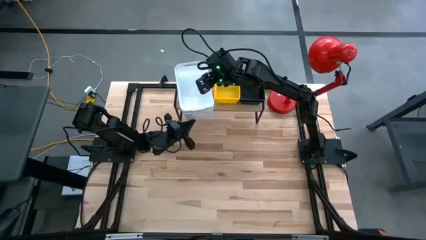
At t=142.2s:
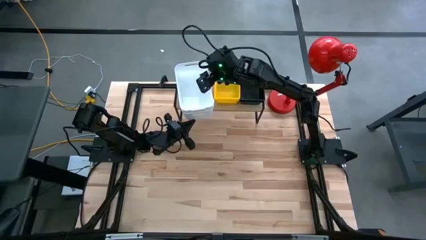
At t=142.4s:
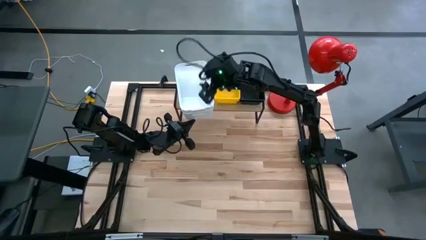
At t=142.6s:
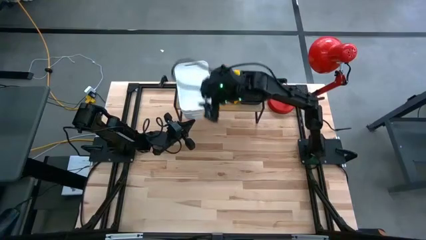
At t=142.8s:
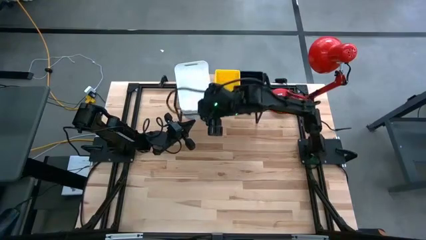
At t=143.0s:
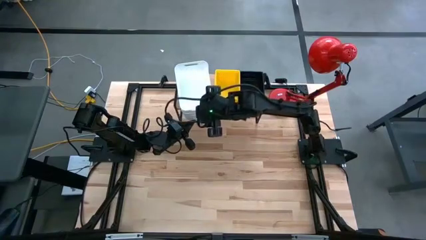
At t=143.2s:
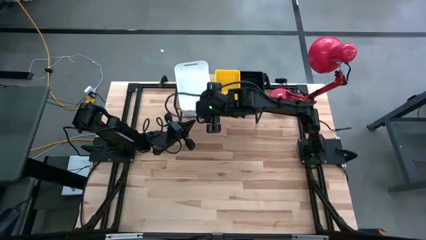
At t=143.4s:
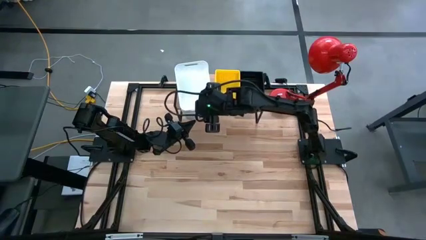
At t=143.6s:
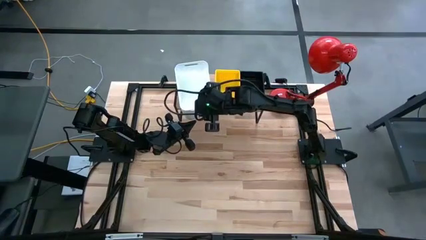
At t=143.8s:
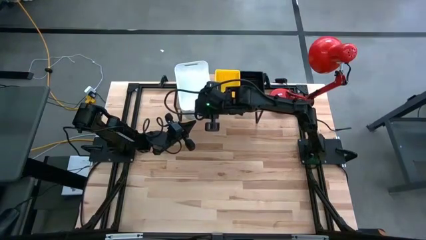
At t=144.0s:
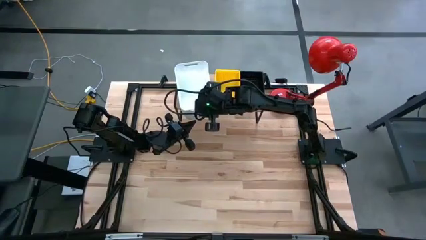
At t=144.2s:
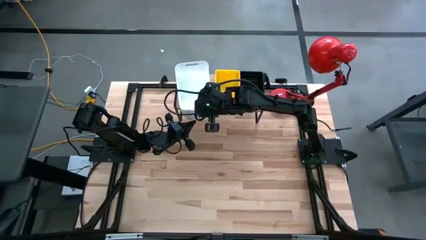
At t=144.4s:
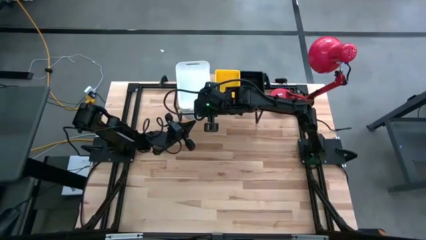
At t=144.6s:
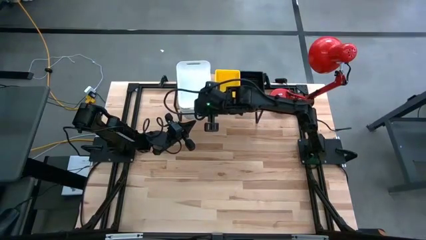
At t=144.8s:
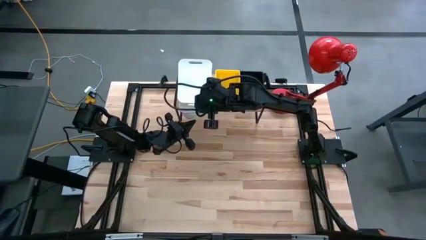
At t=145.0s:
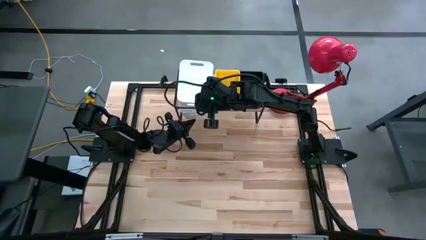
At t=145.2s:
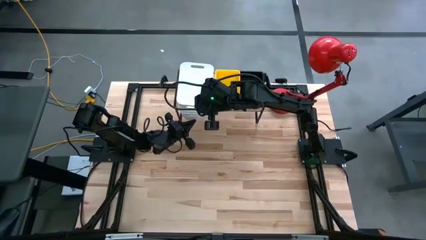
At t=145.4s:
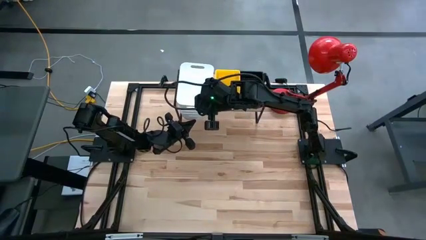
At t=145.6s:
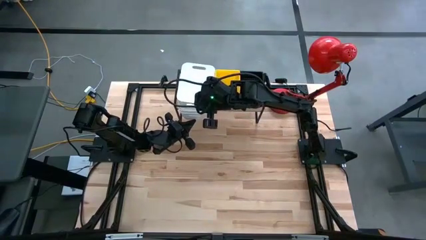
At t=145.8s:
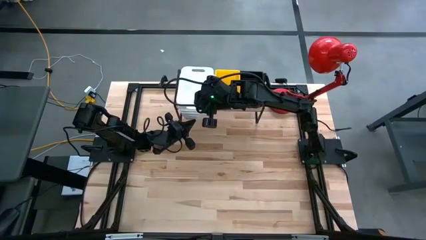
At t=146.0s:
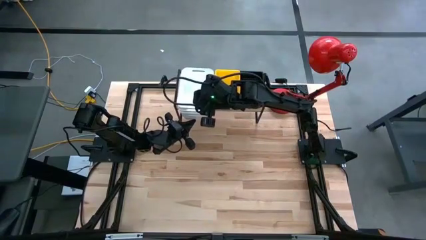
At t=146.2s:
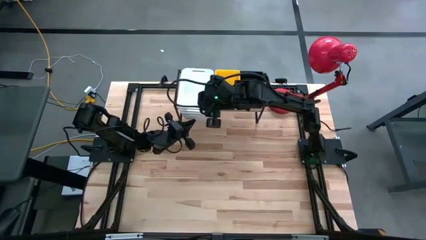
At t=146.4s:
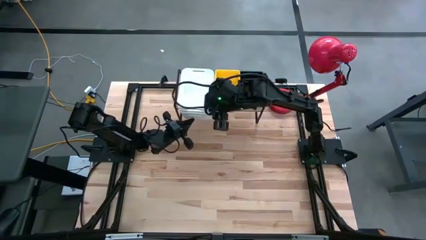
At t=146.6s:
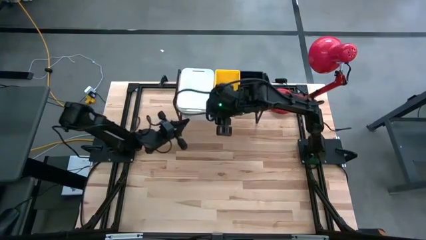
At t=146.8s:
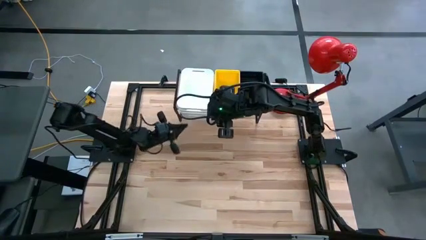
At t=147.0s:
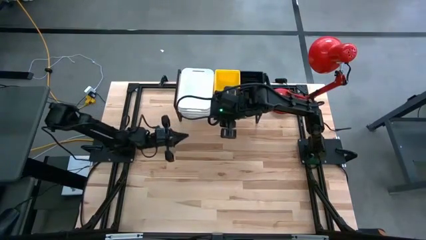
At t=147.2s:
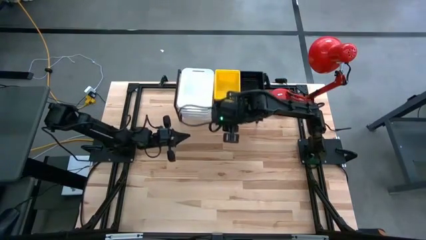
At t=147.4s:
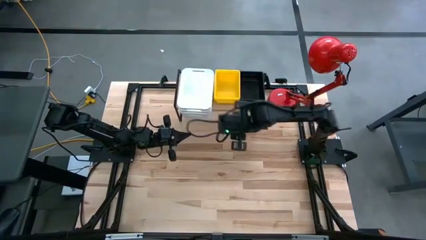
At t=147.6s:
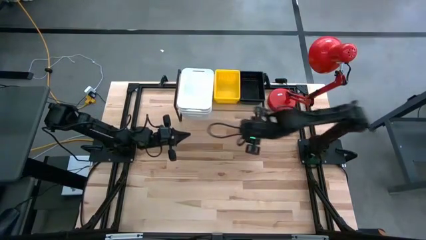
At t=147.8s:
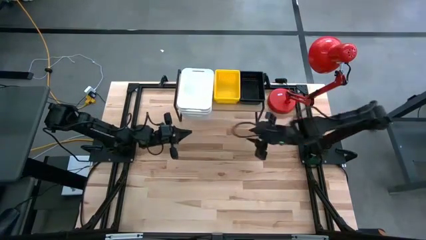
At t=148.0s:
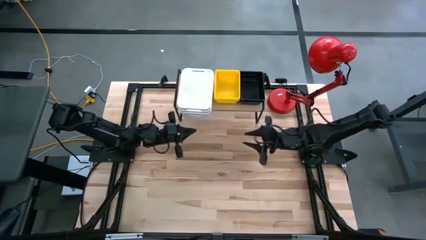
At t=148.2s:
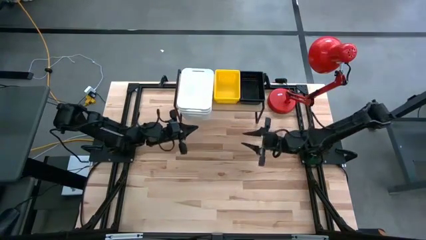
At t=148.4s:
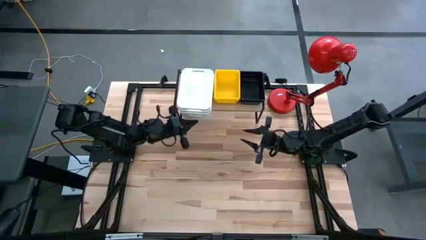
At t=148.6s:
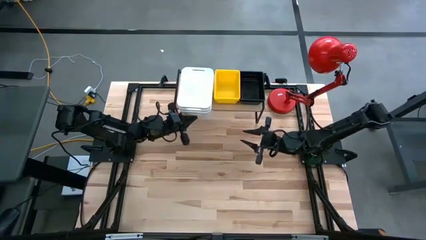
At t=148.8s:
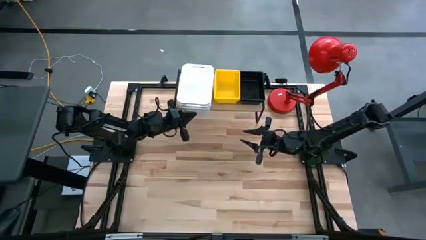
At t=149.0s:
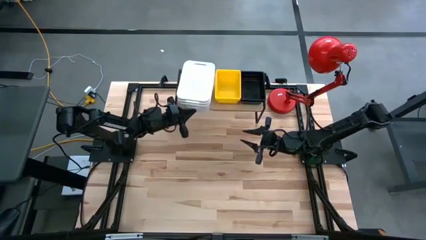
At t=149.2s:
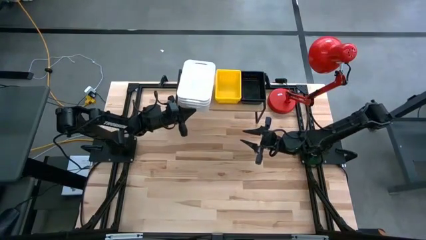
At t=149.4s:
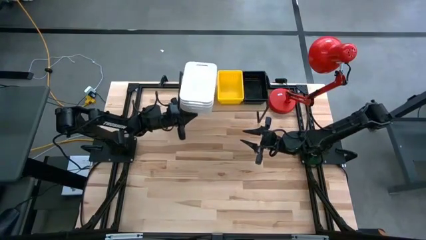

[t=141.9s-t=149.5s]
Task: Stack baskets on shelf by color
Stack the white bin into the other white bin on the shelf

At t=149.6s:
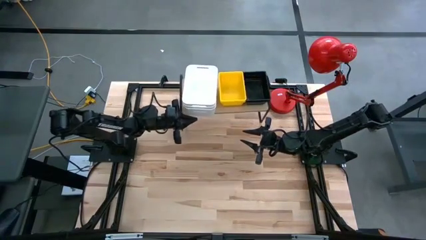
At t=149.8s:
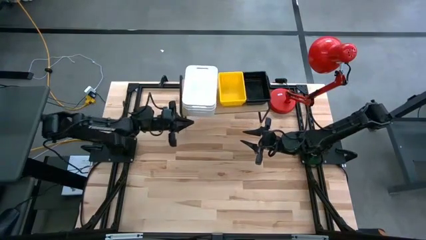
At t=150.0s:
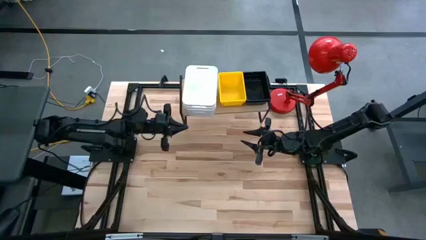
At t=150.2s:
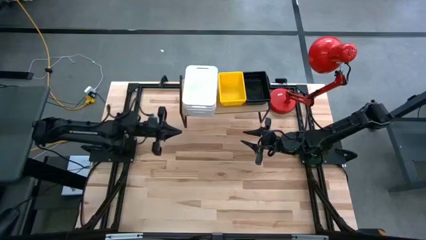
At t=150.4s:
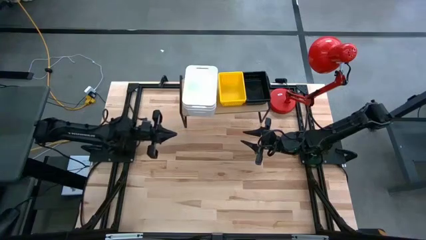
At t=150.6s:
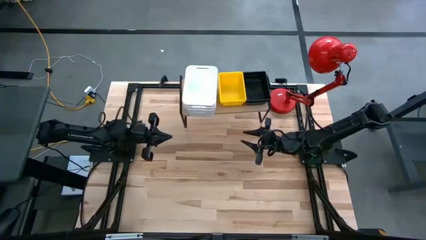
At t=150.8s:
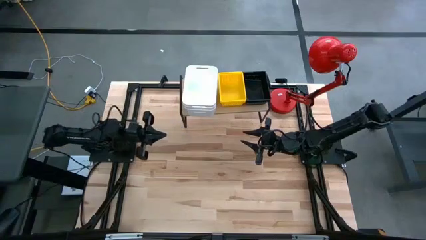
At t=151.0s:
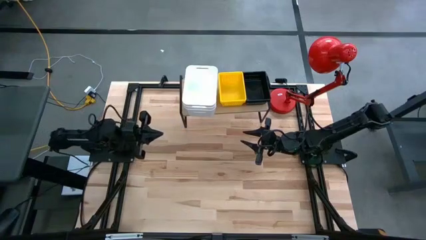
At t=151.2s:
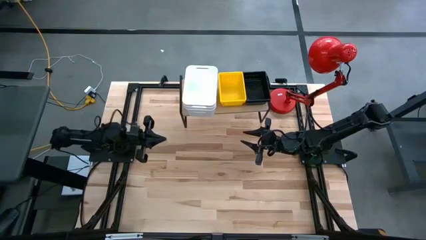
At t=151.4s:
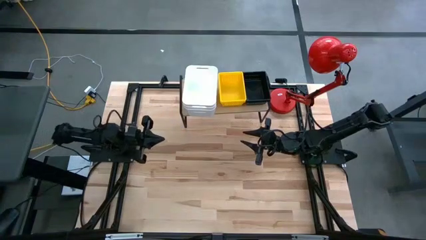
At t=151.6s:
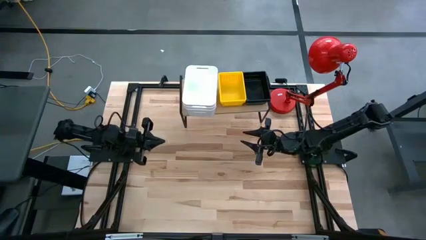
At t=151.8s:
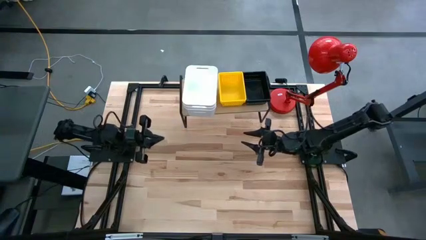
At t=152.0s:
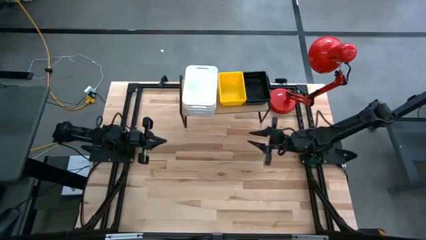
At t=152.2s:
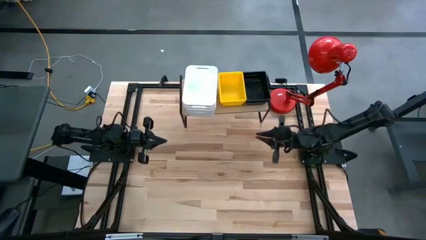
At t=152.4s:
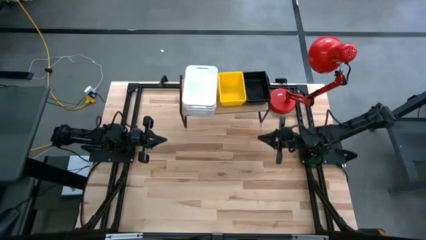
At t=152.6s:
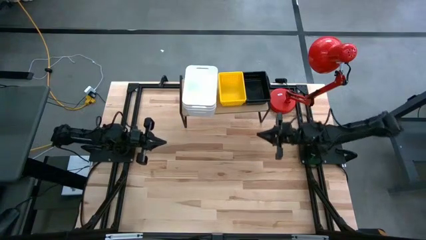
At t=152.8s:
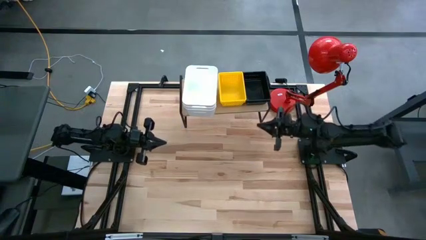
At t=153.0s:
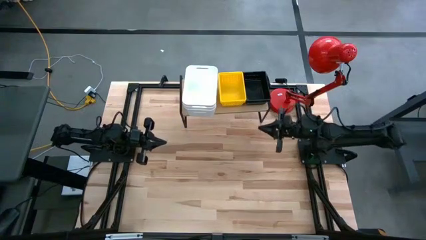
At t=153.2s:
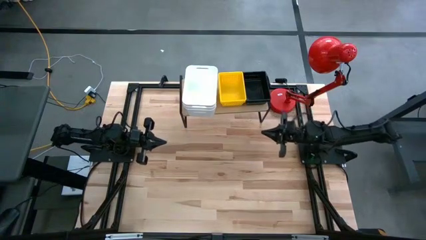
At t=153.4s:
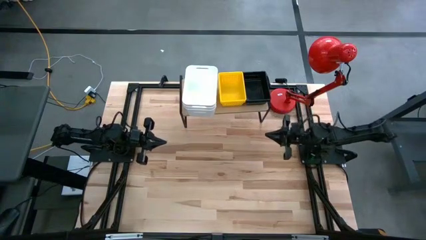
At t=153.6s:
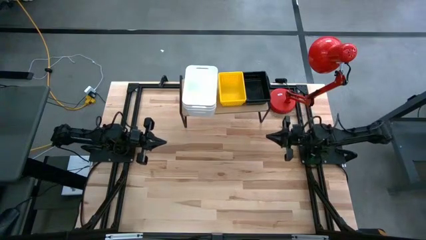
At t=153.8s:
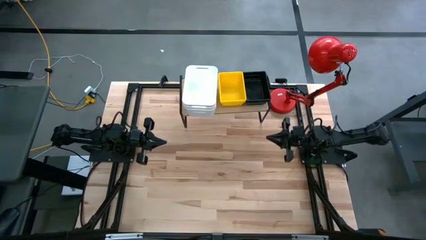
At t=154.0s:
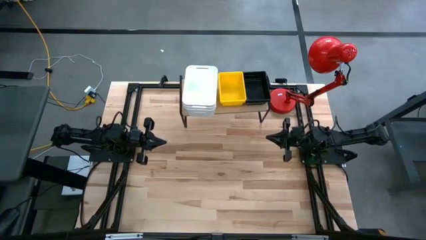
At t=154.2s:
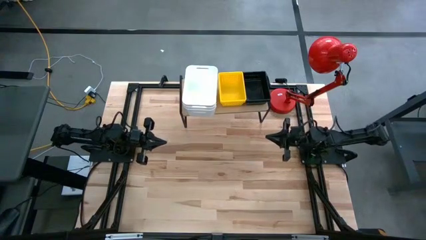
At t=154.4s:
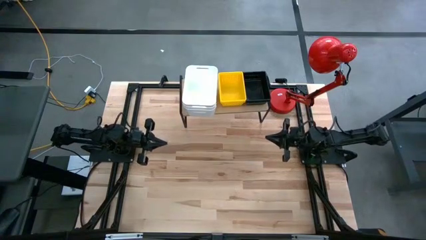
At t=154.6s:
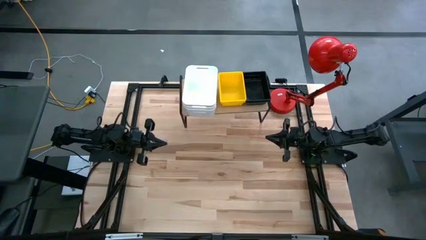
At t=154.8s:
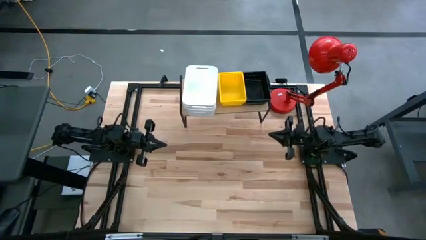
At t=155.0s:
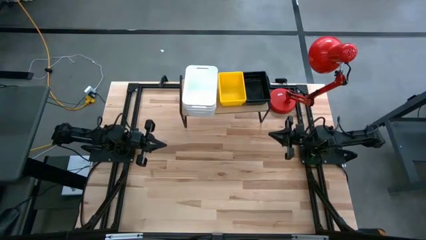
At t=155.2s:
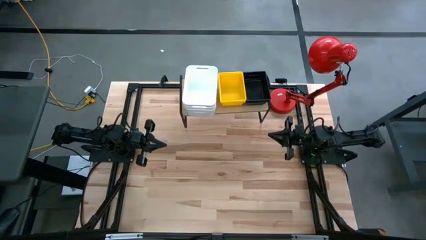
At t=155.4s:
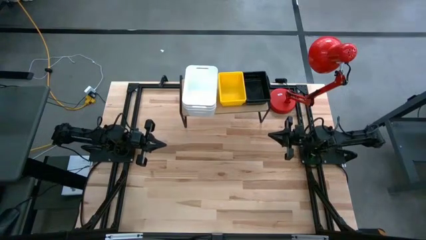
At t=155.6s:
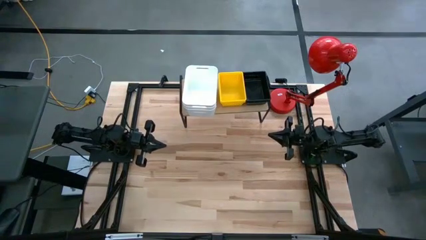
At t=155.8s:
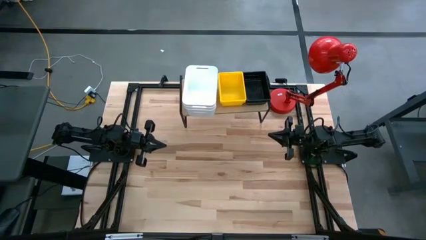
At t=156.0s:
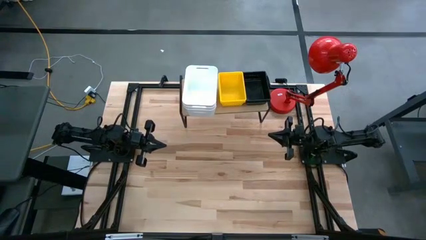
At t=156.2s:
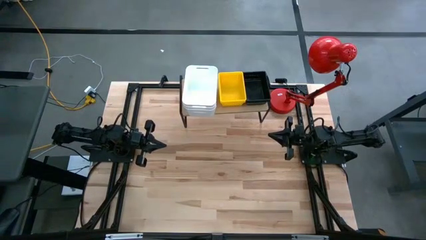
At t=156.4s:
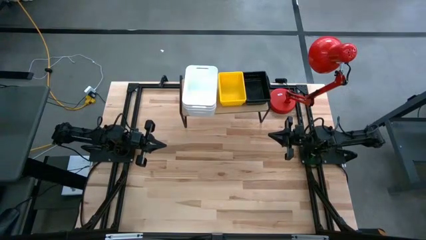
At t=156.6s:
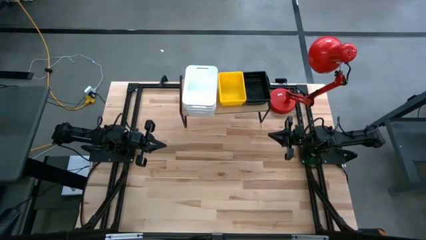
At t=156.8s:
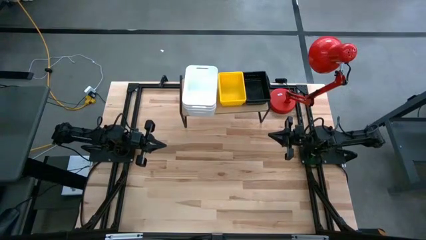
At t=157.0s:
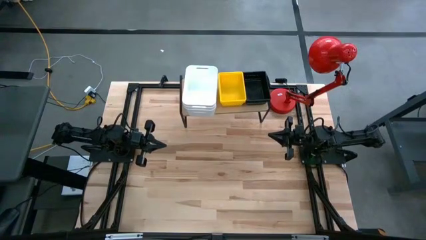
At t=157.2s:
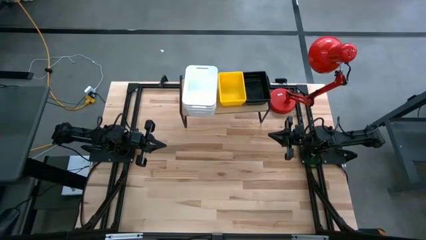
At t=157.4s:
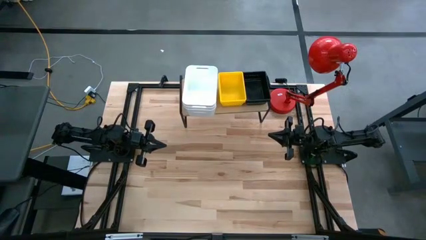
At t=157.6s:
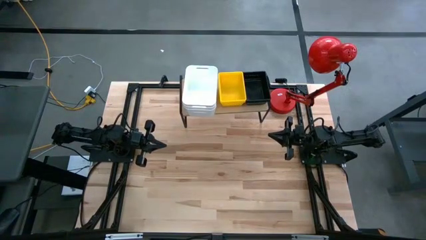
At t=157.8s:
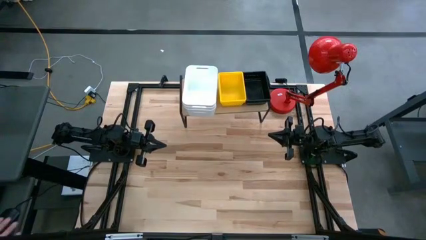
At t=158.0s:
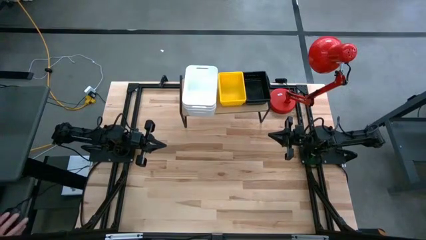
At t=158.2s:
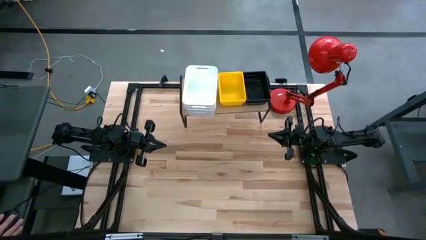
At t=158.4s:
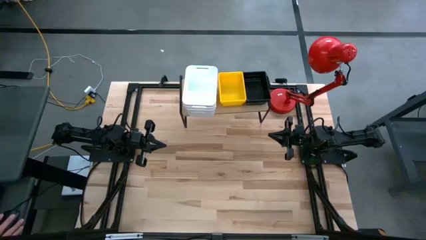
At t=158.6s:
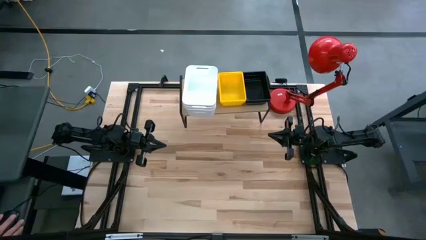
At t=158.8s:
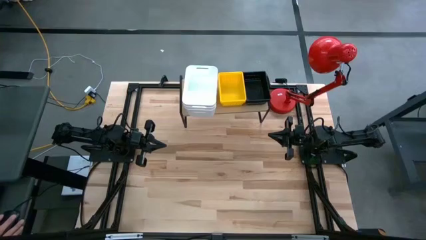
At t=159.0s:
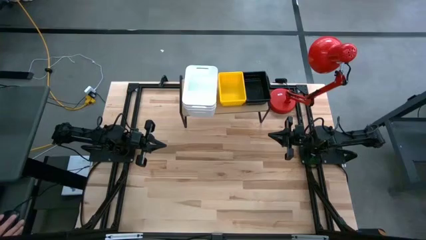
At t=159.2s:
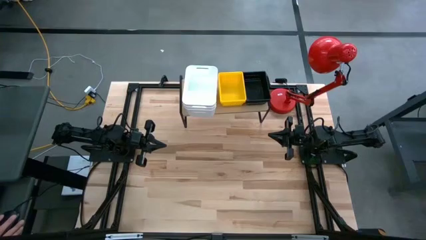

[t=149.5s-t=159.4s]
Return to Home Position
